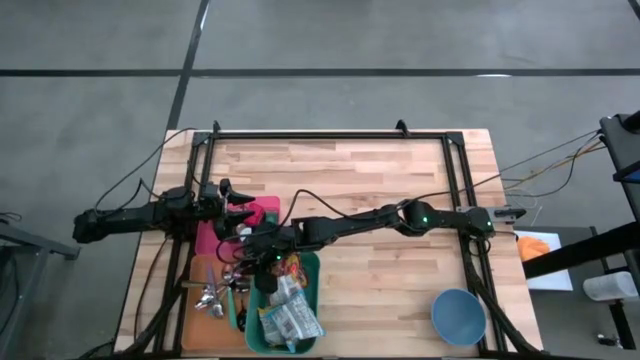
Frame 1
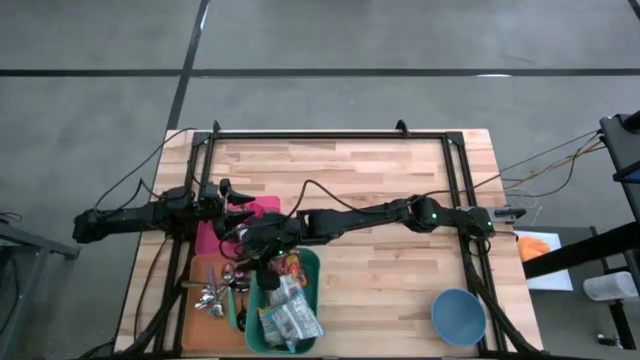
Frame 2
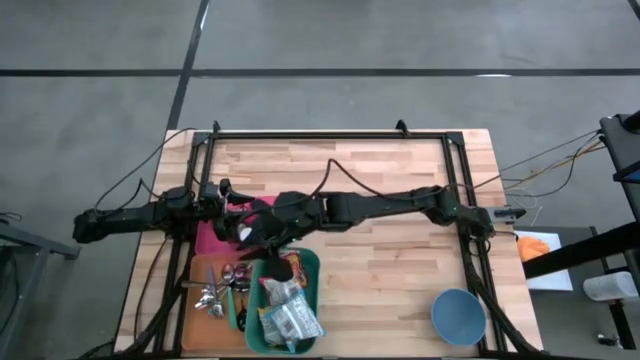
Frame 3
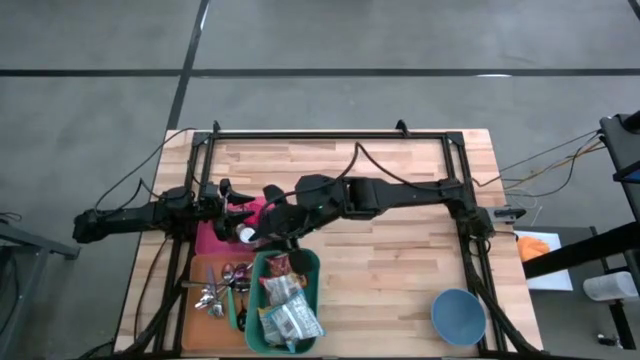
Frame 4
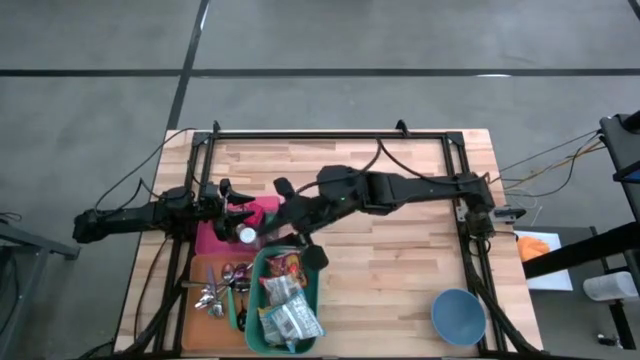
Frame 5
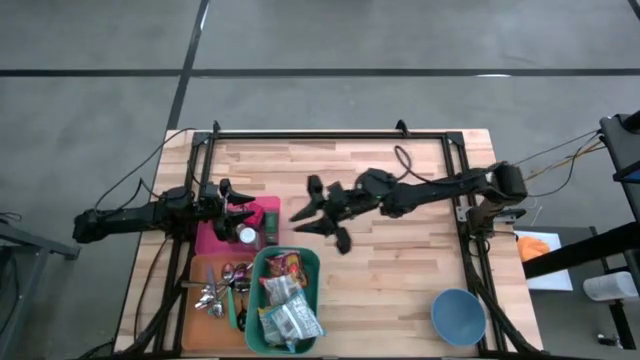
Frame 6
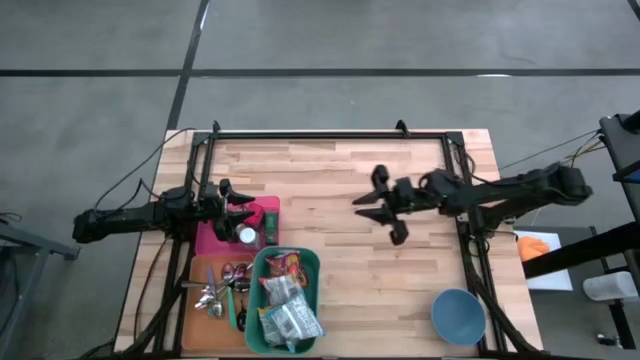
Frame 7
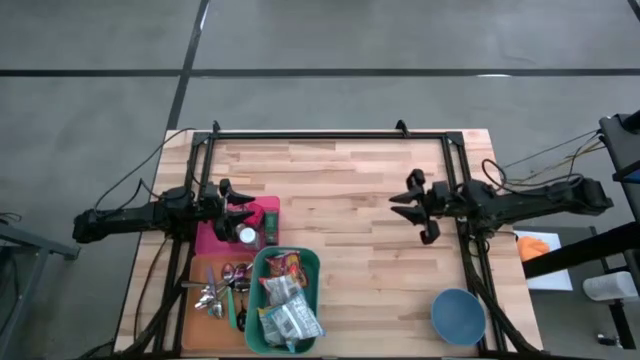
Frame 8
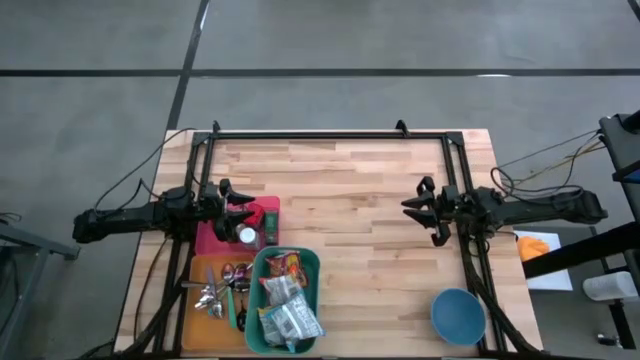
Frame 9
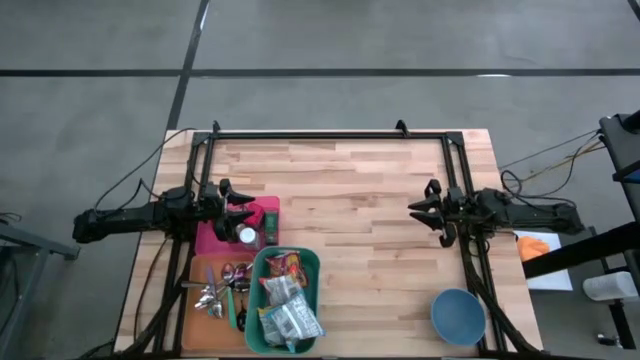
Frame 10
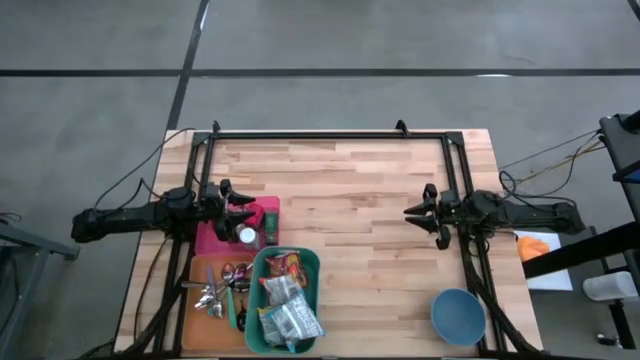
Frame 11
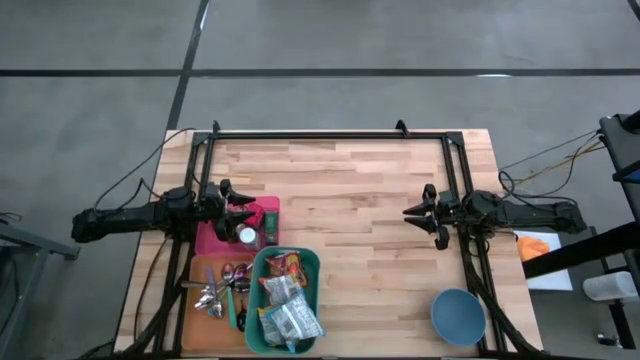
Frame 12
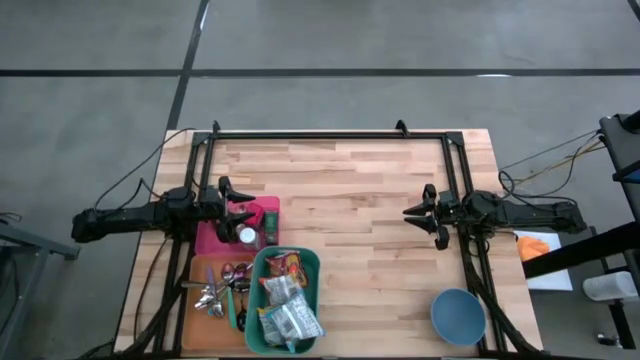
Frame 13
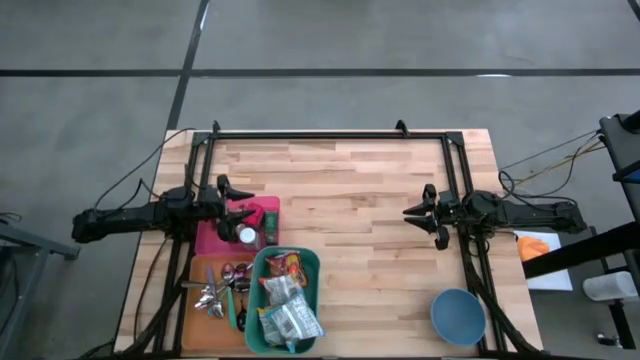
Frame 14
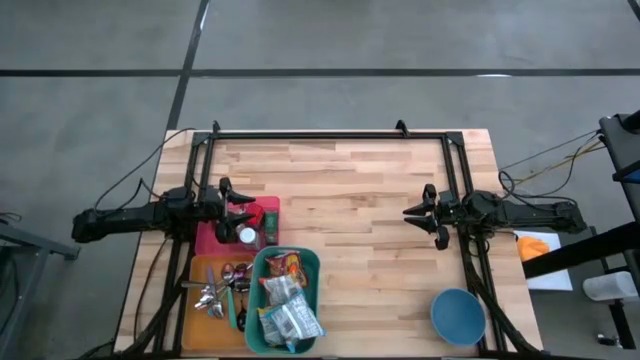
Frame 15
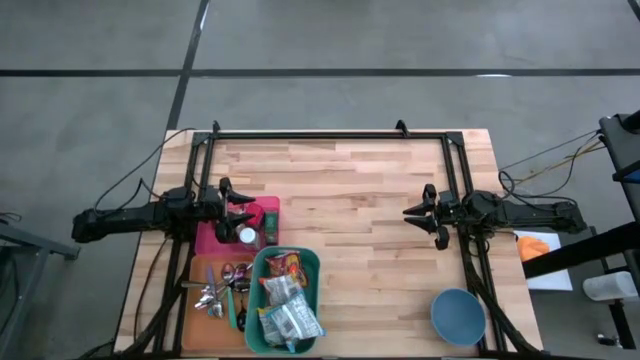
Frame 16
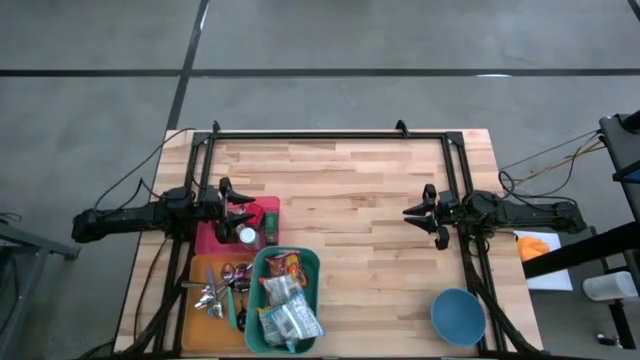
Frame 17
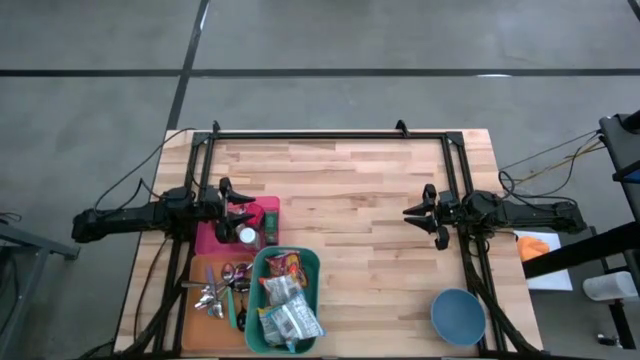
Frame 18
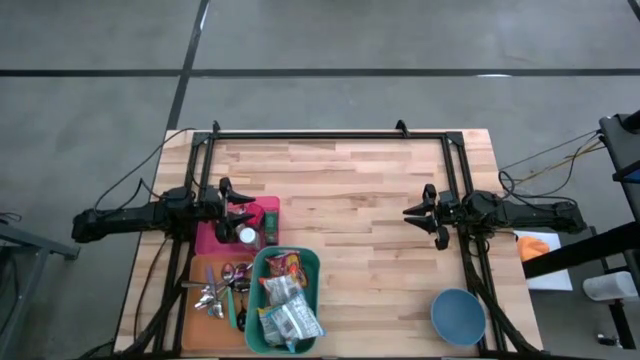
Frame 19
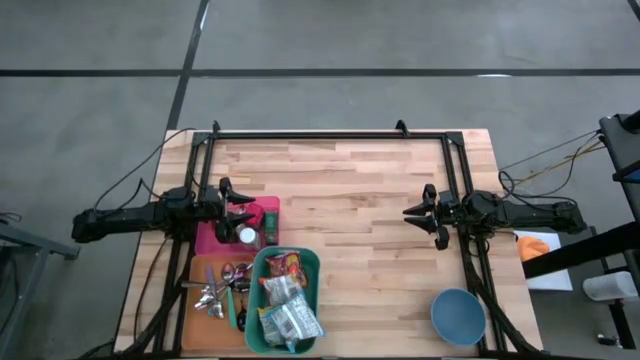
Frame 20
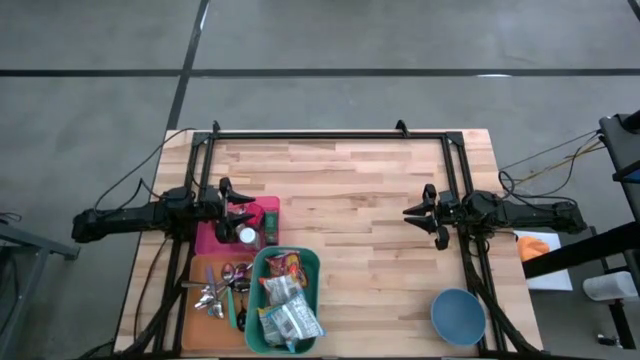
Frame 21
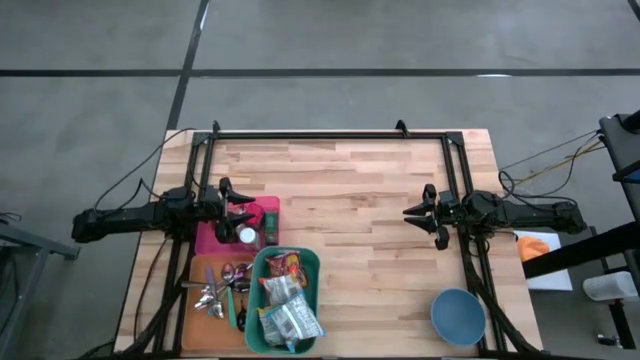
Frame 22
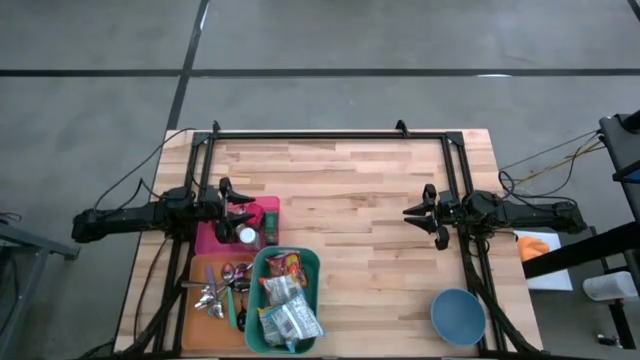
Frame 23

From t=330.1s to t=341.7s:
Return to Home Position
